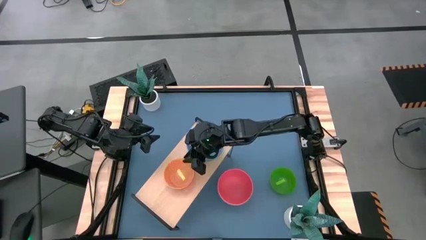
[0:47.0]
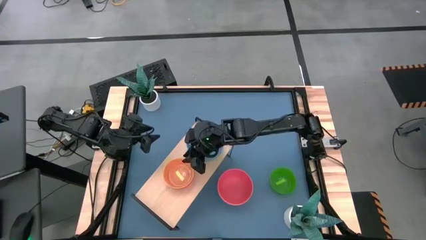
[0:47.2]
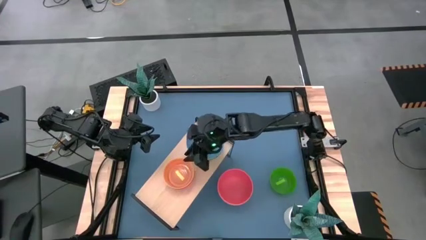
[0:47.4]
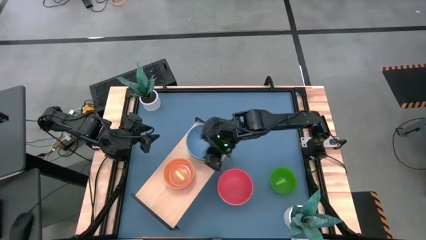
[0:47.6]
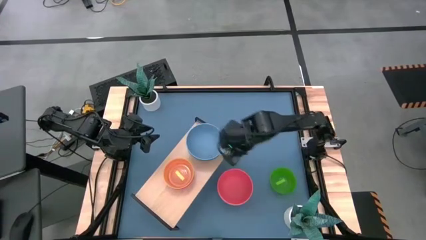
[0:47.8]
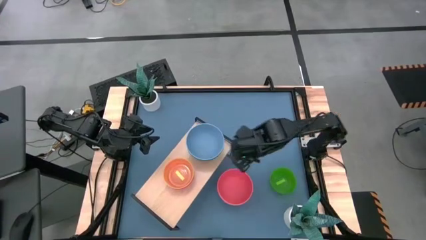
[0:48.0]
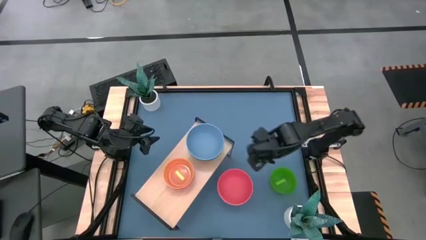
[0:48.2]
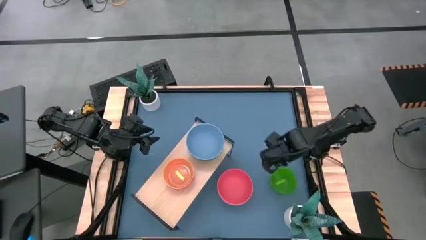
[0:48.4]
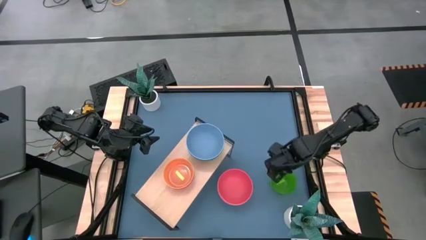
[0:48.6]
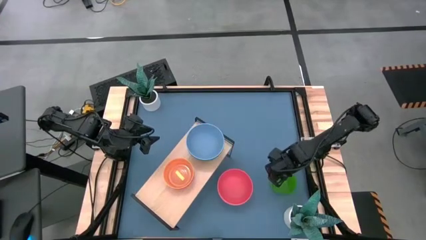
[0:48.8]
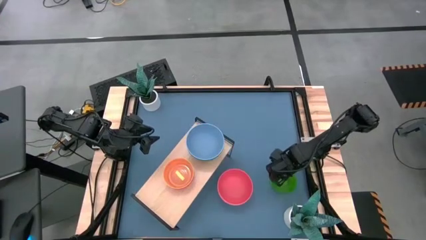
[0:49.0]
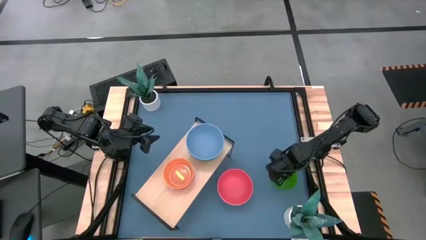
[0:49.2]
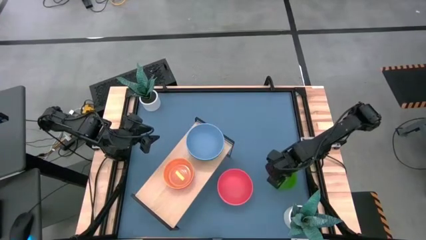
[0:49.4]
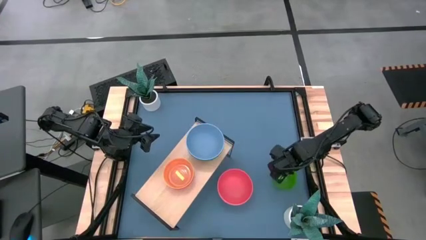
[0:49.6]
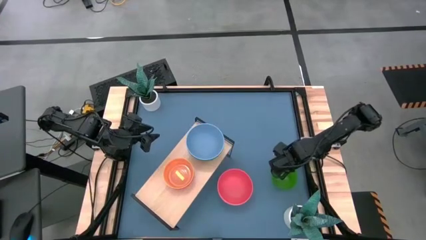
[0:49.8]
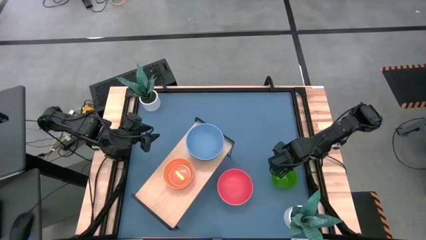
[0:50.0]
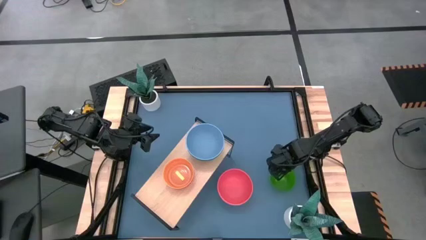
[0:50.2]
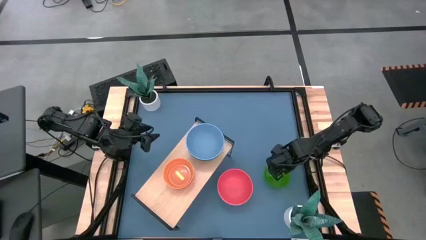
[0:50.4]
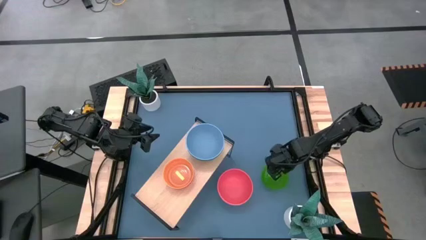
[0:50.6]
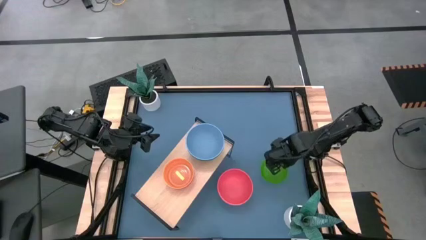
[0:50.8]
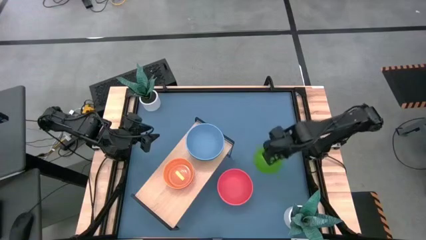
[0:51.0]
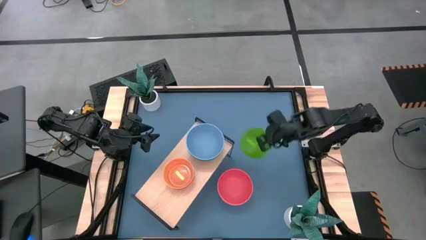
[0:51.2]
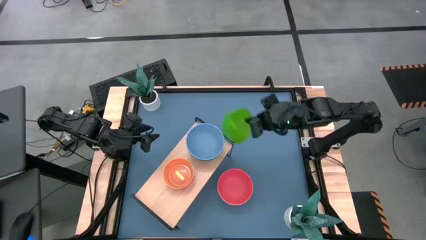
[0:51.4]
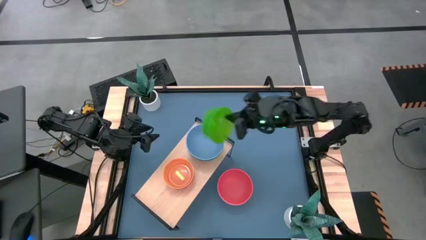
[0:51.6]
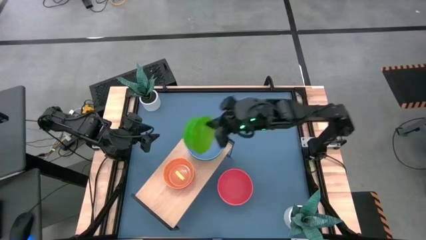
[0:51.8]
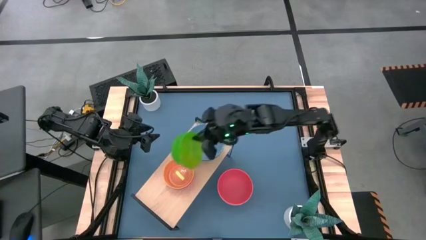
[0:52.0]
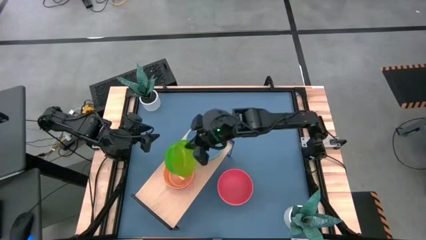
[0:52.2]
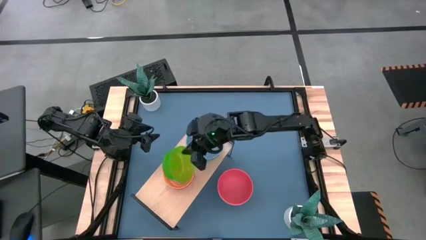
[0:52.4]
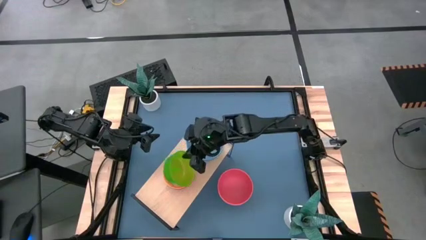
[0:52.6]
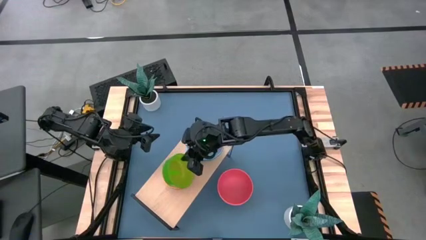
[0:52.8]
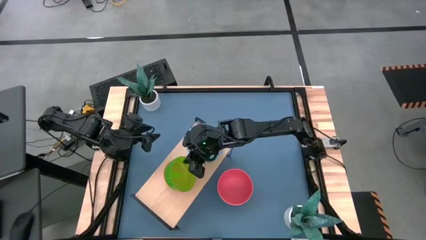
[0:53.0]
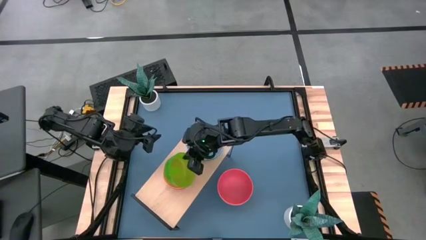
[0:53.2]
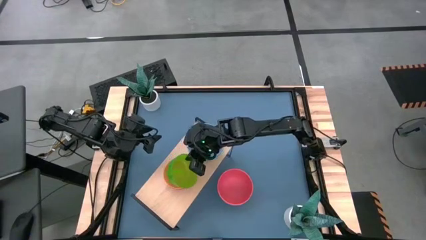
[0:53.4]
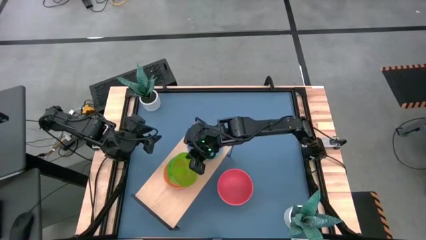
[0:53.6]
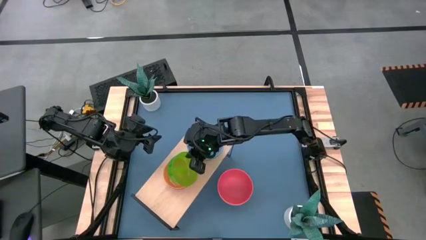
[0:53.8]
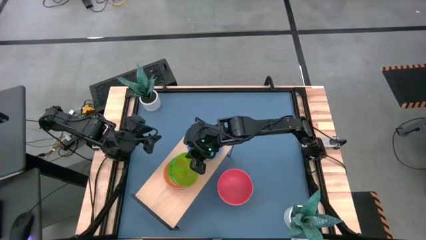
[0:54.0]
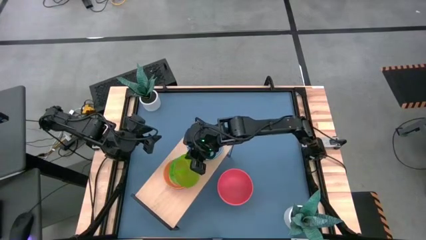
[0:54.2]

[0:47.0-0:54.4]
Task: Place and stack bowls onto a shelf
Stack the light green bowl on top of the light orange bowl on the shelf

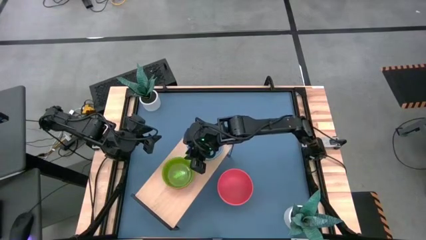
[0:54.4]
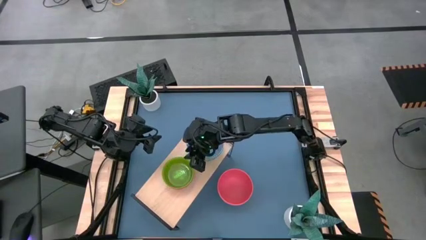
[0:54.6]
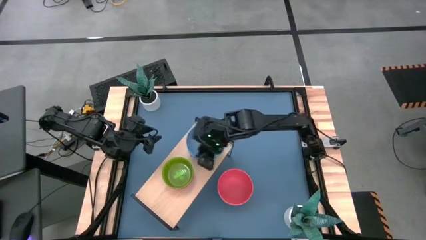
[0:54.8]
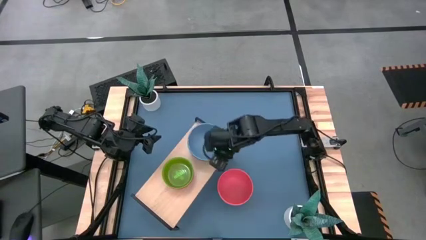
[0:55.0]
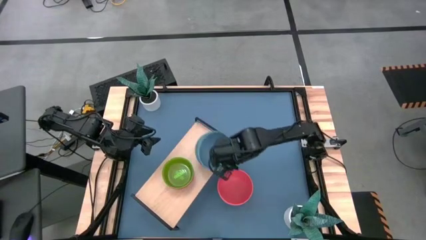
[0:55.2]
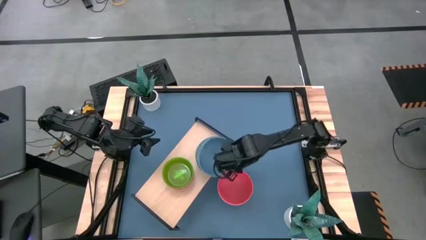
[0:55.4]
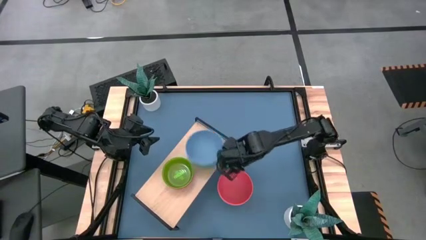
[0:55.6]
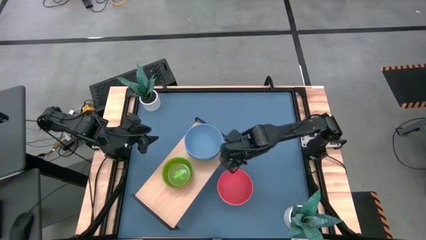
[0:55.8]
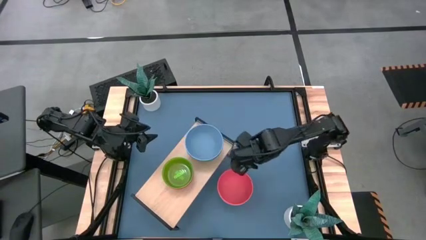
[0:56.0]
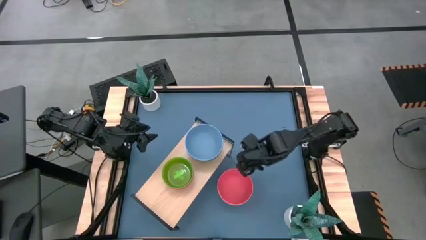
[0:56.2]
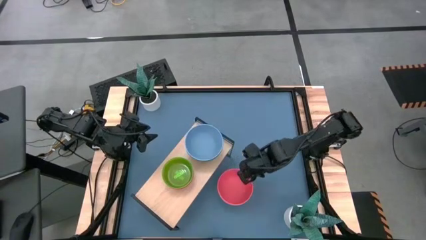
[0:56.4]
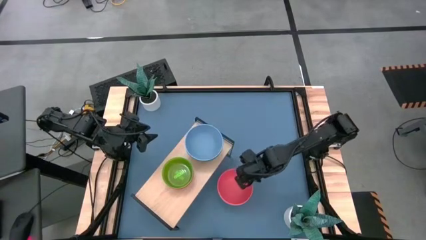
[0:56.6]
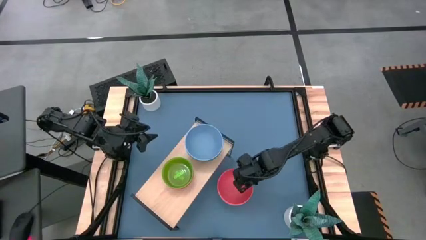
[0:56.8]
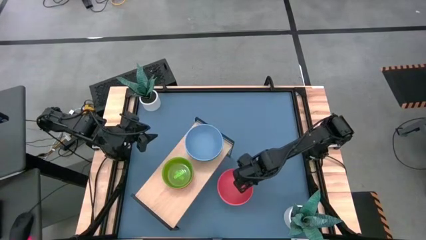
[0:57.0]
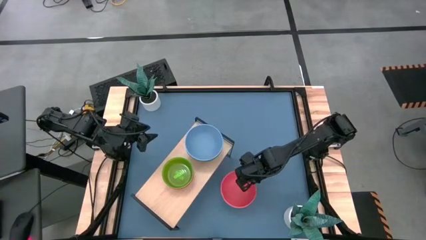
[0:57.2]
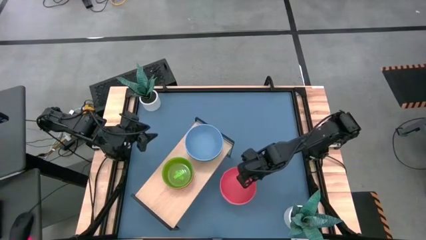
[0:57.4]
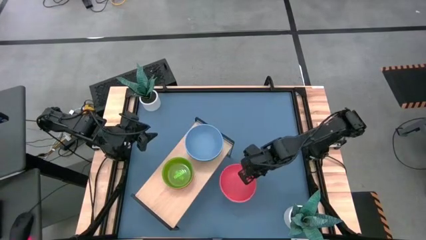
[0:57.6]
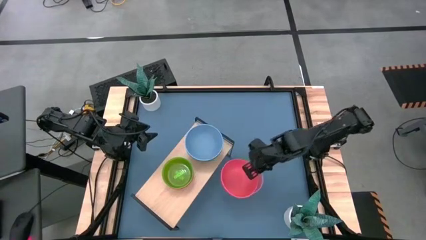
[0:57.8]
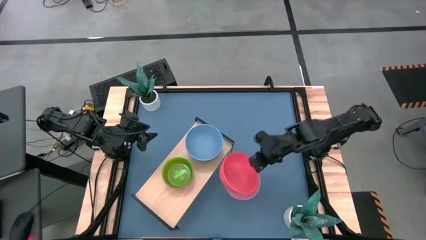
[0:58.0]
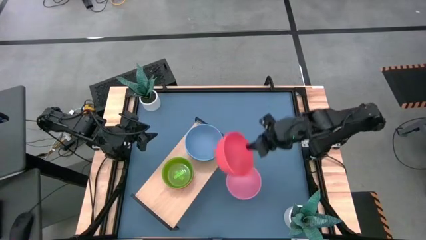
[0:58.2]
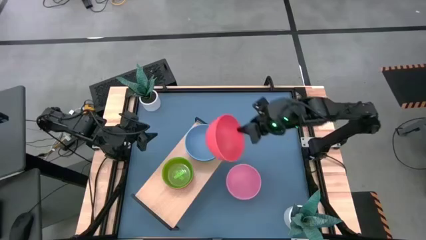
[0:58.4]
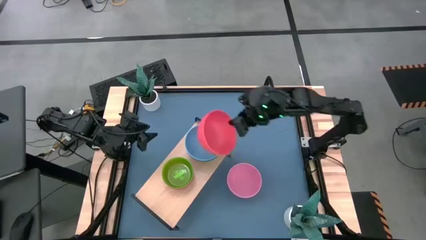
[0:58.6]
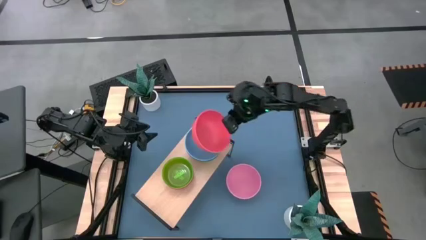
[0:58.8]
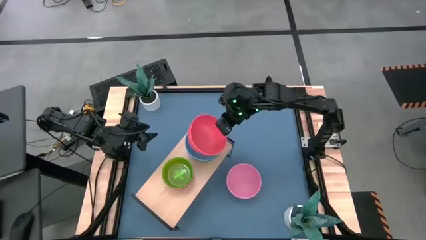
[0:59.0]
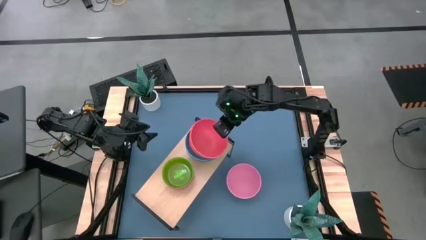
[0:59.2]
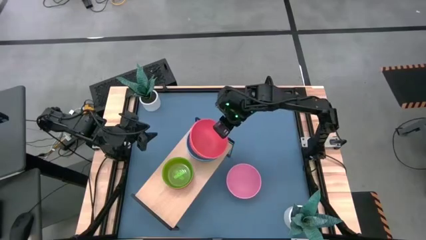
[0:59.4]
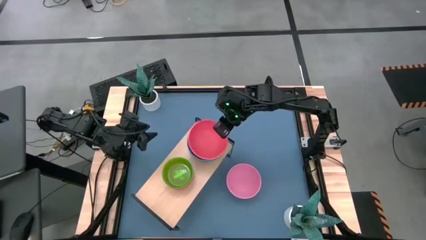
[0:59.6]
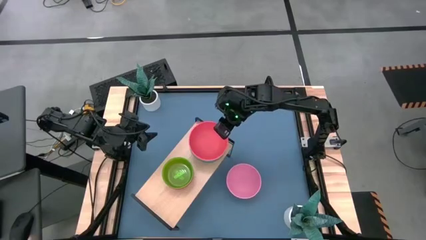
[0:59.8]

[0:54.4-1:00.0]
Stack the orange bowl on top of the blue bowl on the shelf

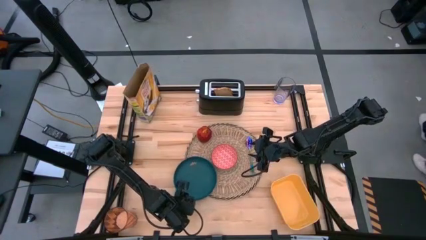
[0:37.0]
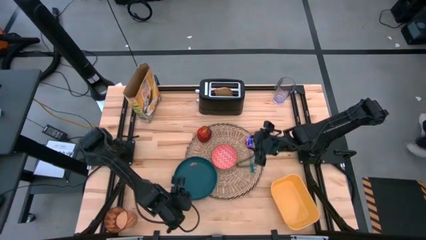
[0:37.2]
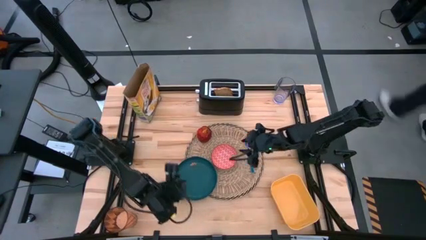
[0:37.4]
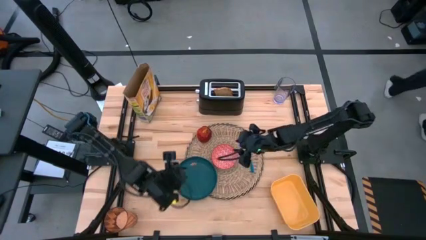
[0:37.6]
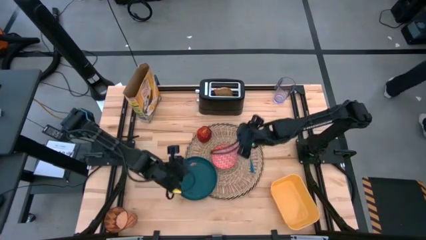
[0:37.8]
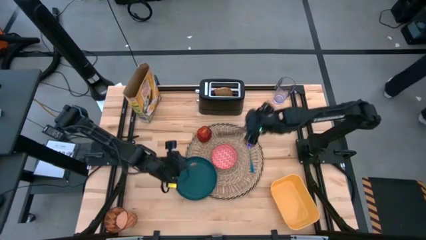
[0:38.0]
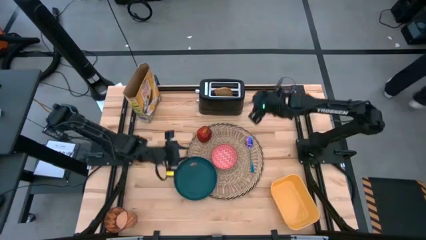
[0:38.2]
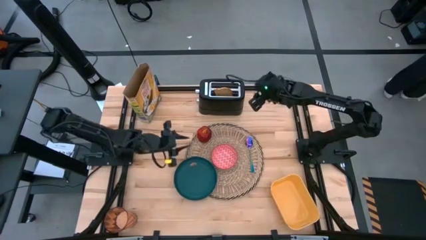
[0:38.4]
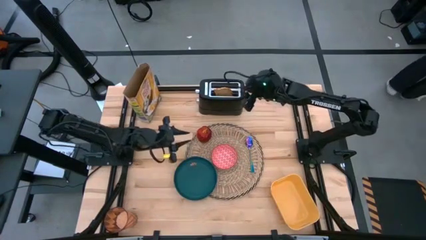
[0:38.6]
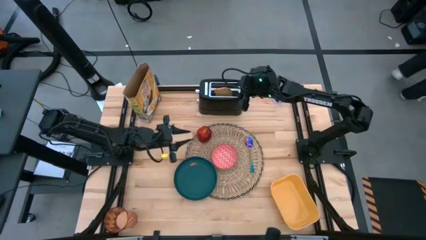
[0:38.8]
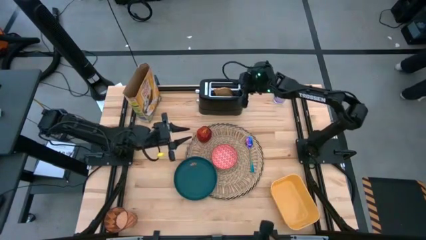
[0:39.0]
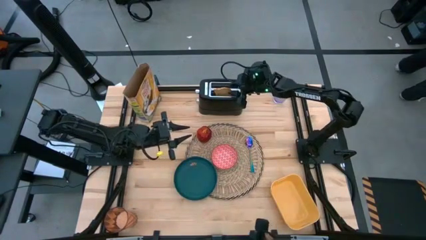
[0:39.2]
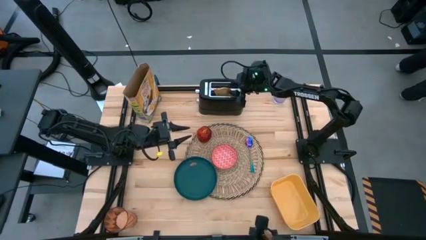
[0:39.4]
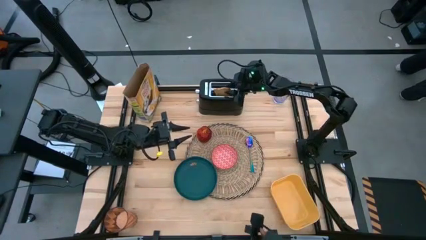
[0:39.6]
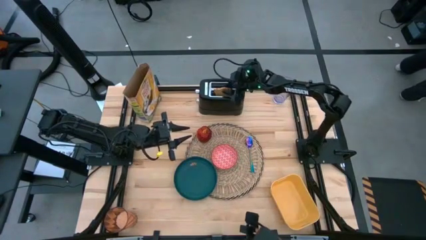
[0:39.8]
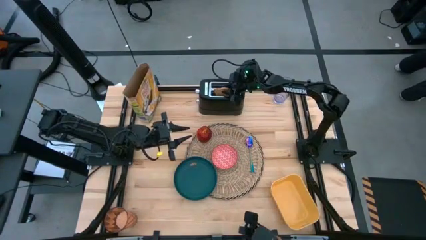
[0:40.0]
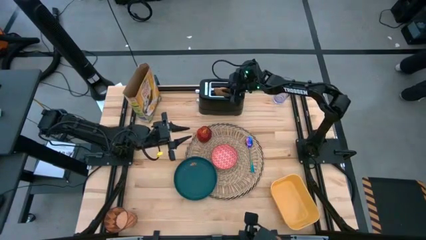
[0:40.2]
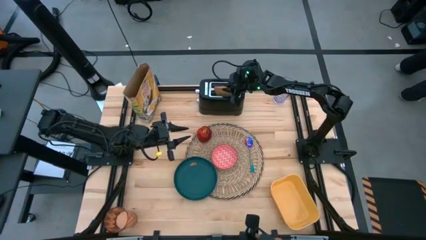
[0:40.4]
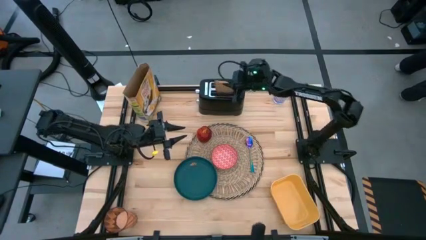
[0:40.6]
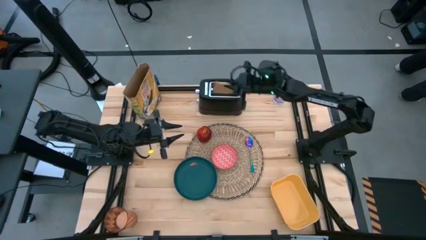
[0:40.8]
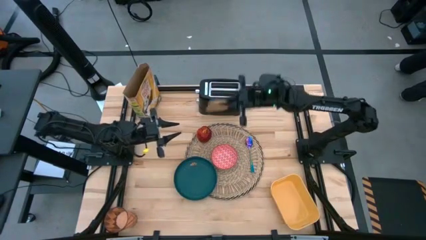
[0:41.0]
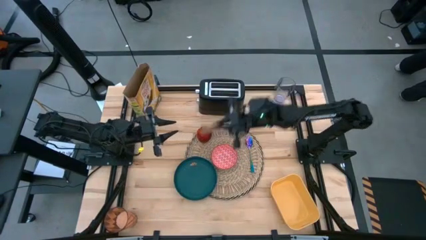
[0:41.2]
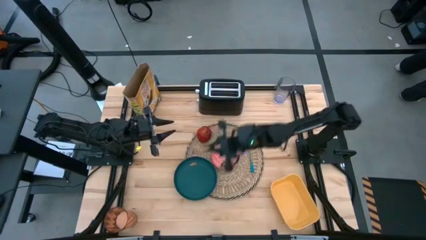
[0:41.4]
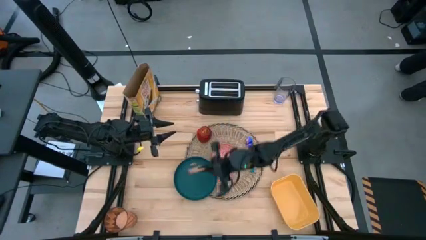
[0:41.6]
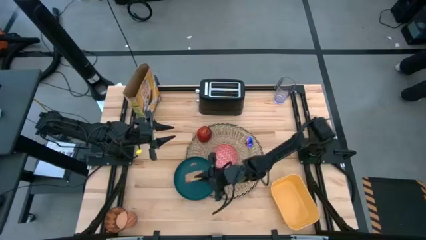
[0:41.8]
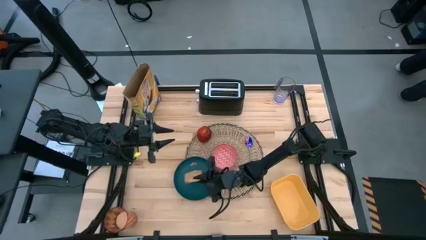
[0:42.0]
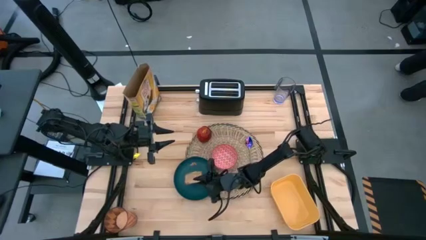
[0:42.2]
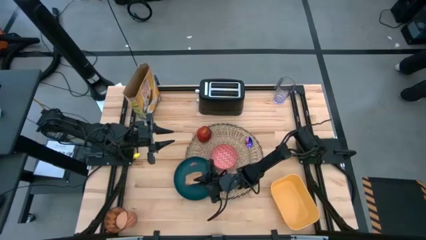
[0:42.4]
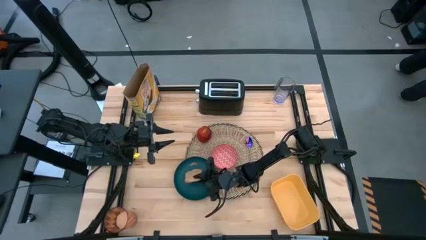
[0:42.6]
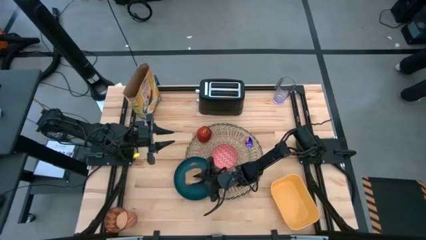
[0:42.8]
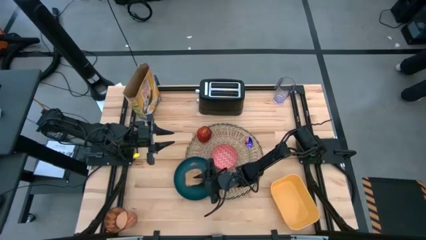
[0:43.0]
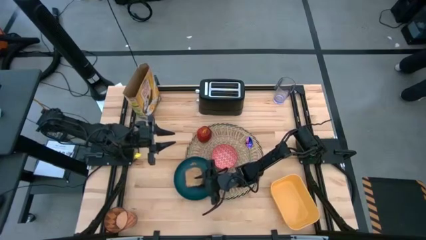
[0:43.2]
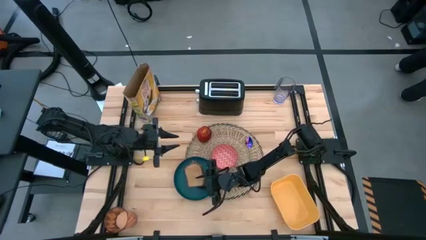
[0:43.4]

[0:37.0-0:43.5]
Task: Arrange a breakfast setting
Put the toasted bread on the blue plate
